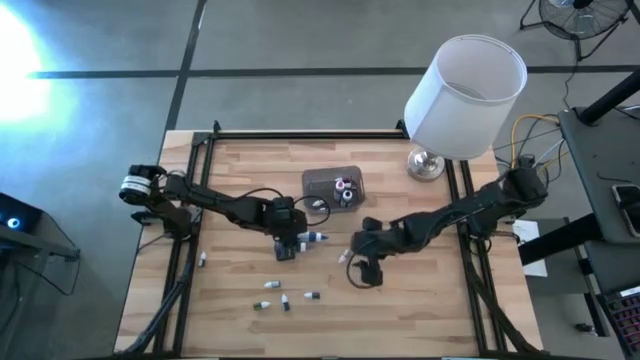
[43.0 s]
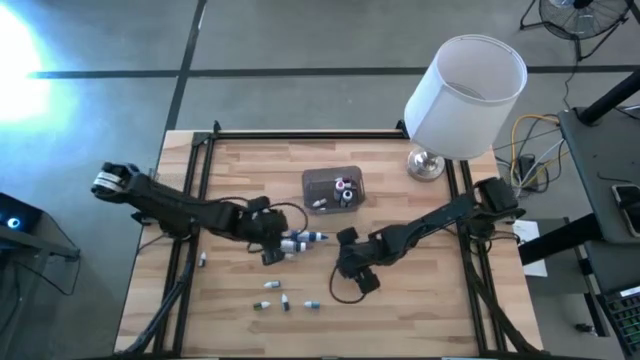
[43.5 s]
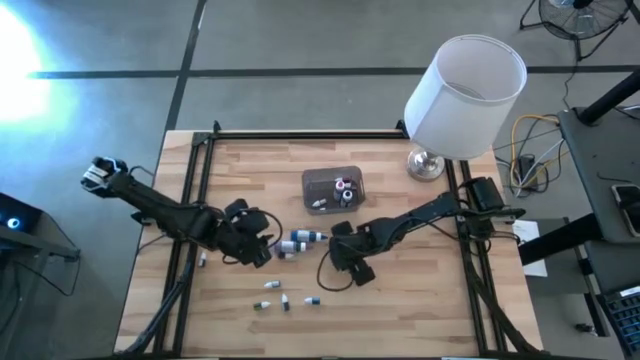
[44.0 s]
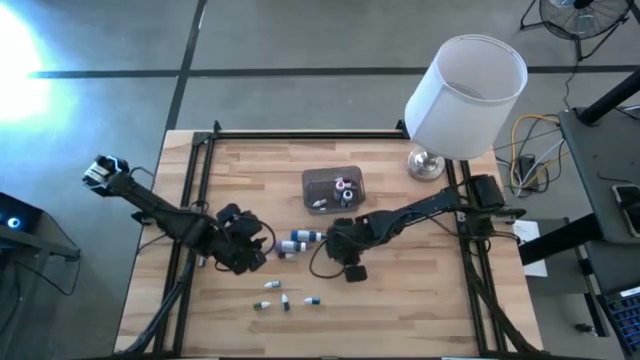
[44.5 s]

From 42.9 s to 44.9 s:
Task: Pick & Place food coloring
Put the small green food coloring bottle into the bin

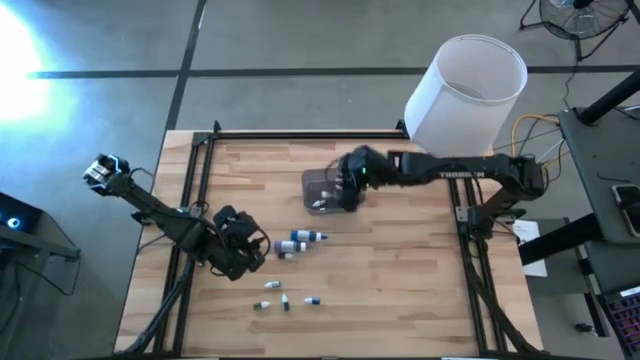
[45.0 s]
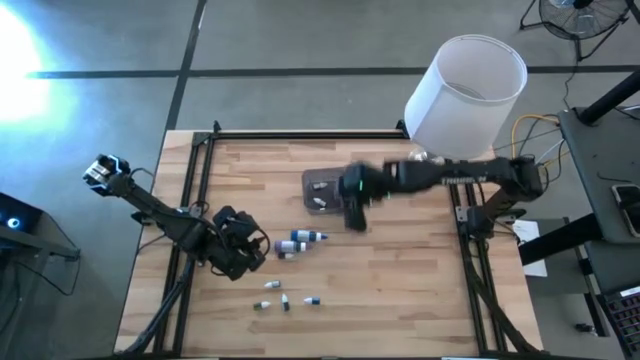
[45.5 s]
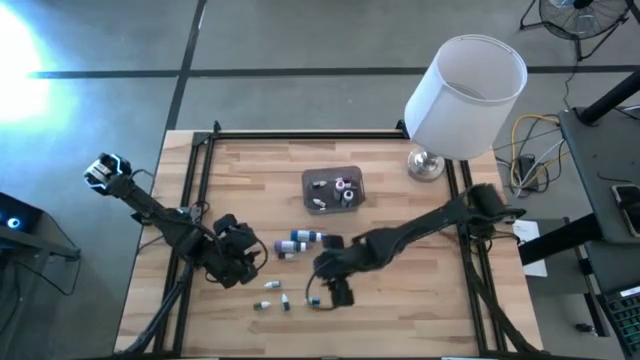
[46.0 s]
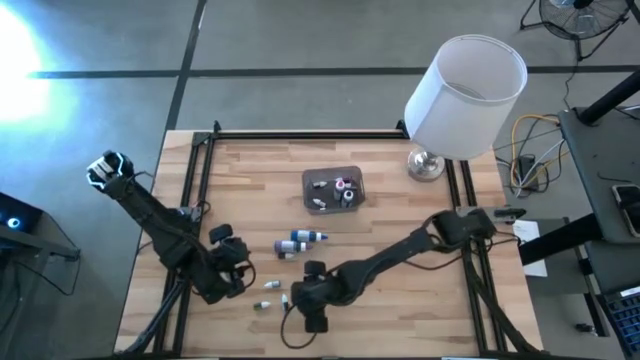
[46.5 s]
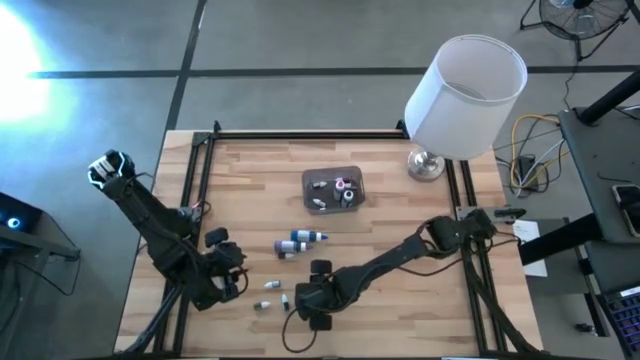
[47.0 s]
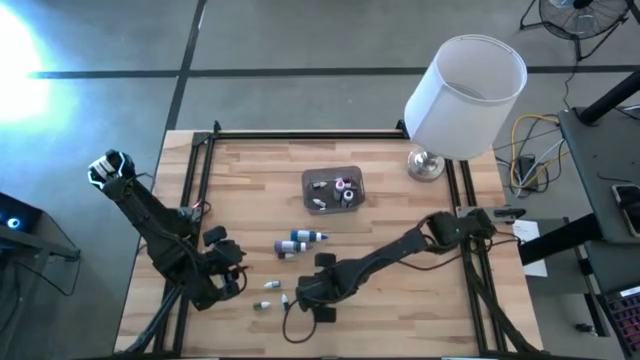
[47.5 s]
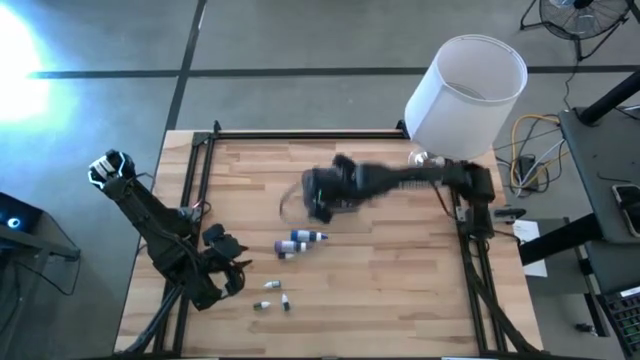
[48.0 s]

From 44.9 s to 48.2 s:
Put the small blue food coloring bottle into the bin

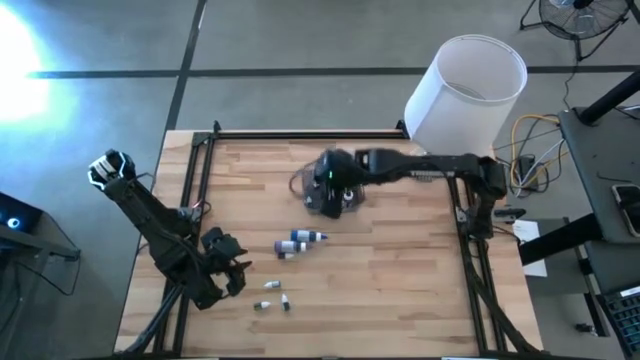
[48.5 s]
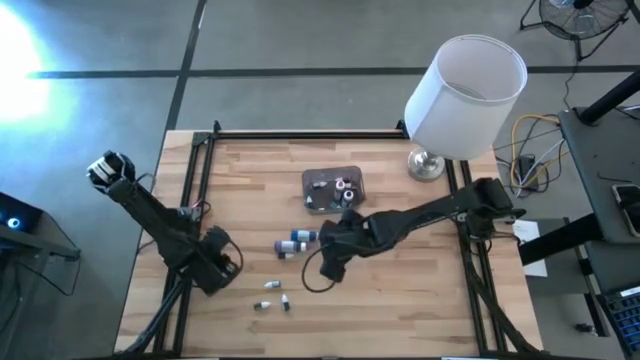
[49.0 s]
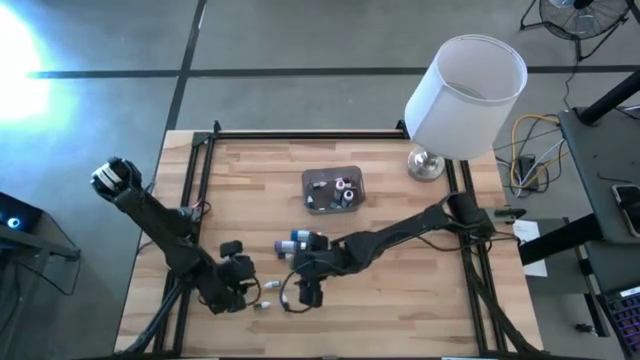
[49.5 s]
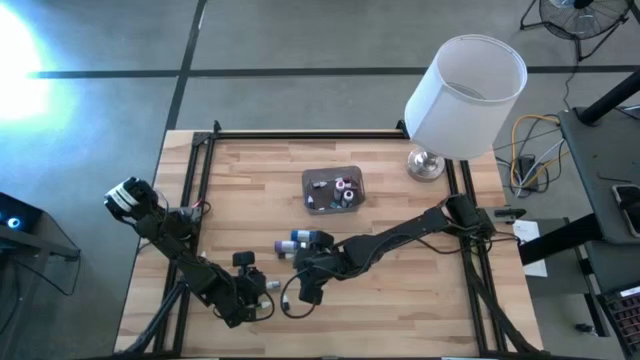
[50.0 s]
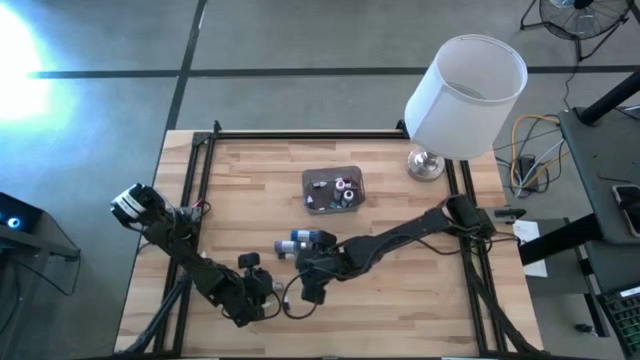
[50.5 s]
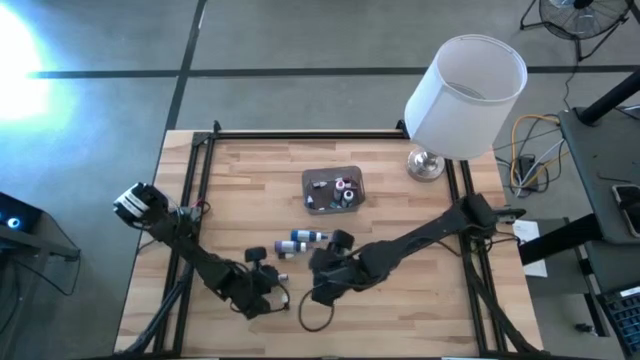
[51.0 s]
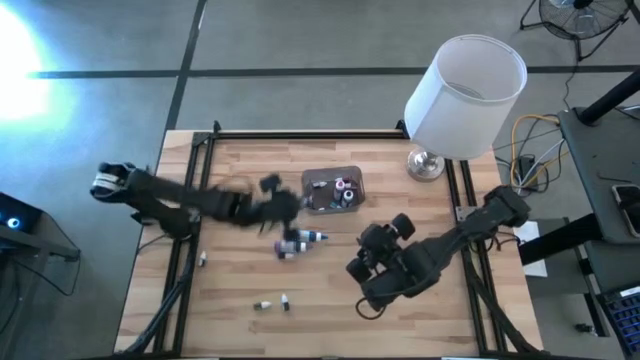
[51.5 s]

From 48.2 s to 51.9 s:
Put the small black food coloring bottle into the bin

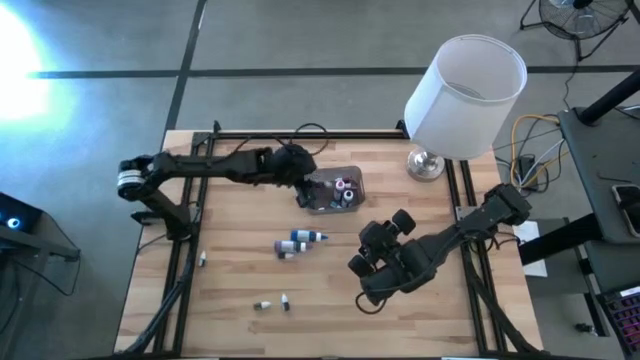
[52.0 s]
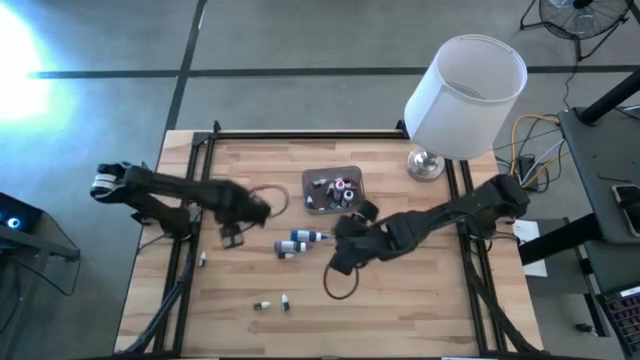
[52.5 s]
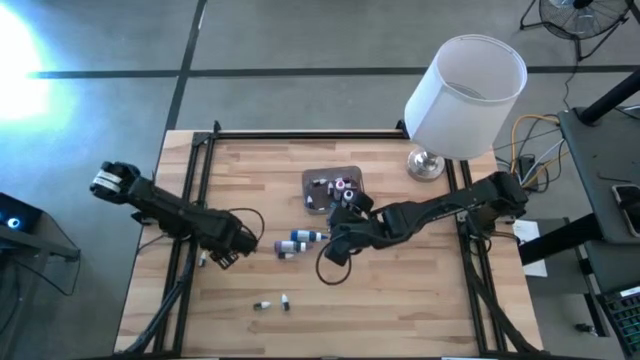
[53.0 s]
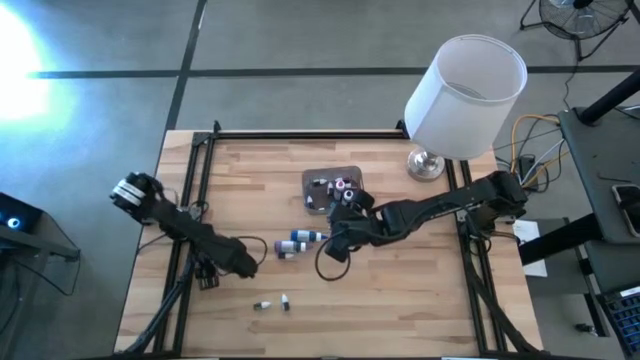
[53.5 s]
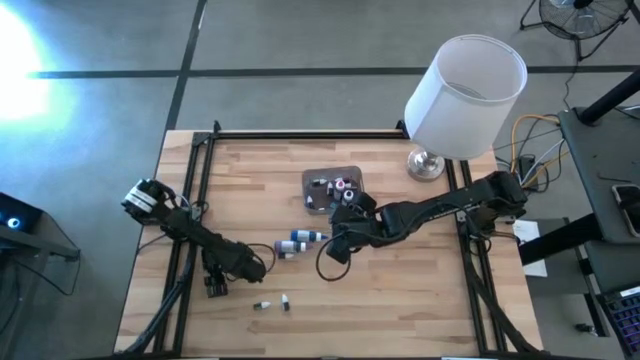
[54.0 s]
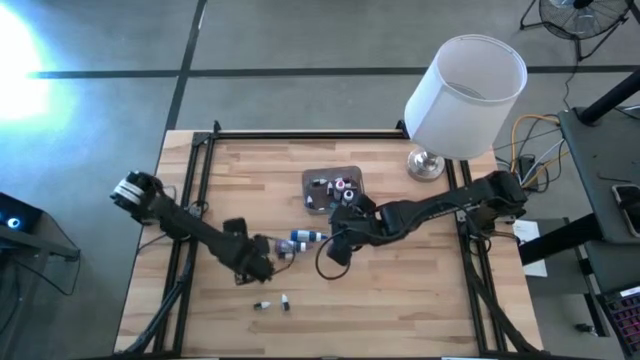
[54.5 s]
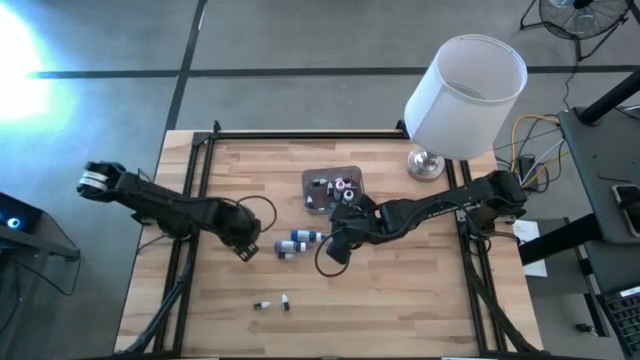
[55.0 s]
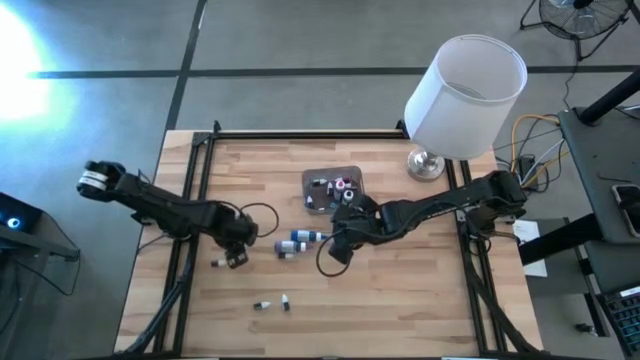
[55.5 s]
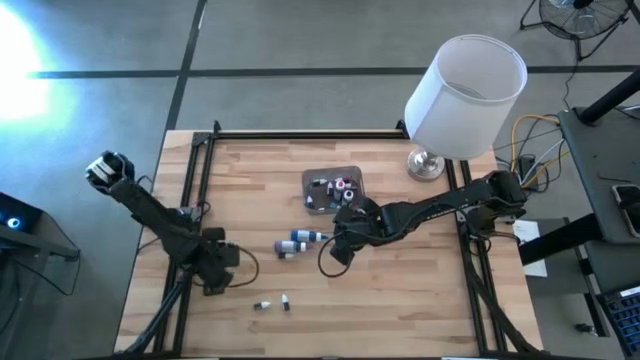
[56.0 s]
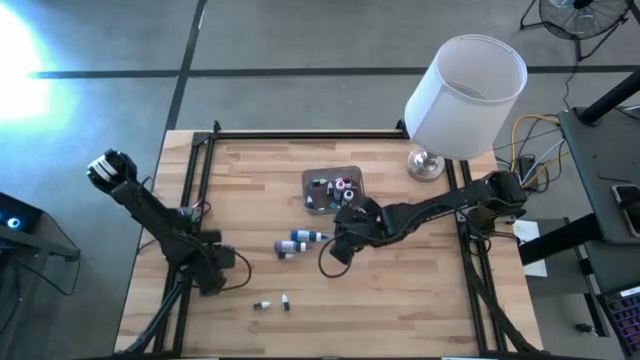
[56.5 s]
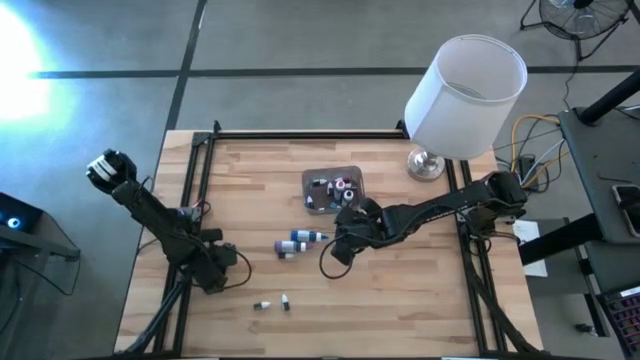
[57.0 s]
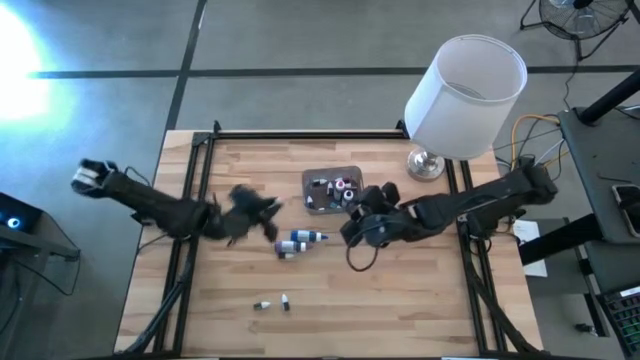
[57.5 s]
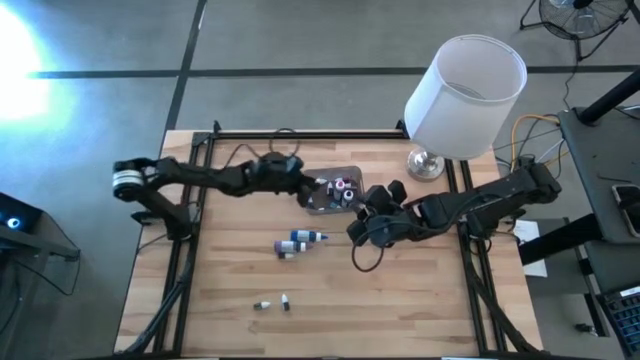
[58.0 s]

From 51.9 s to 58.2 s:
Put the small black food coloring bottle into the bin

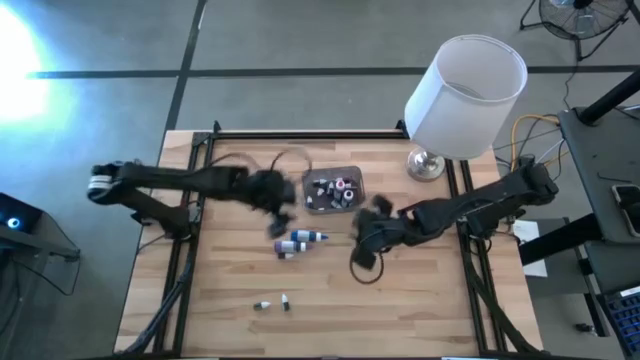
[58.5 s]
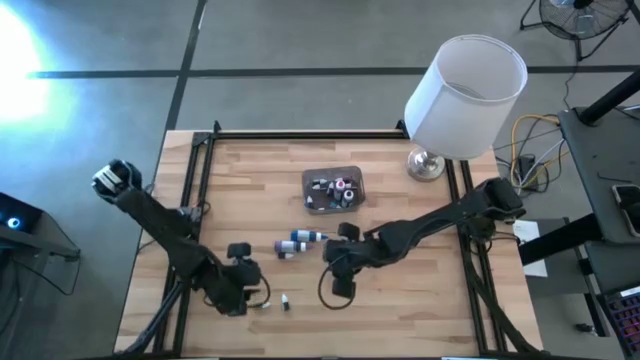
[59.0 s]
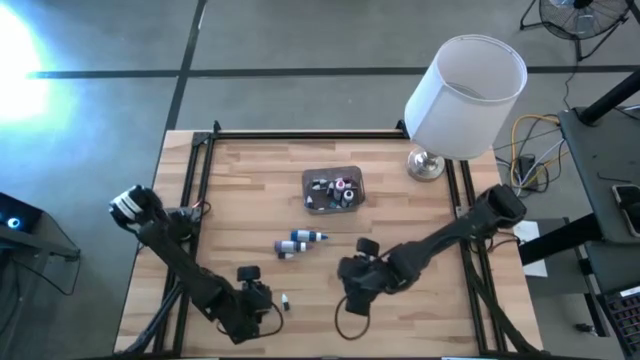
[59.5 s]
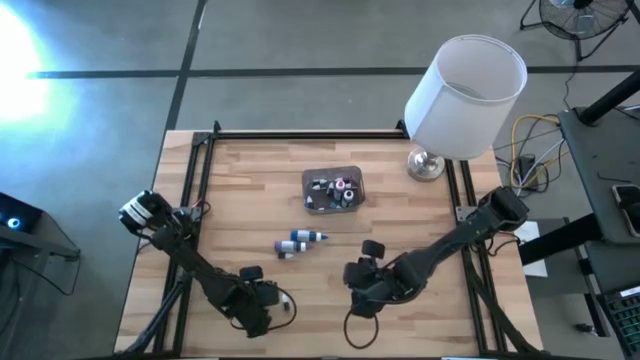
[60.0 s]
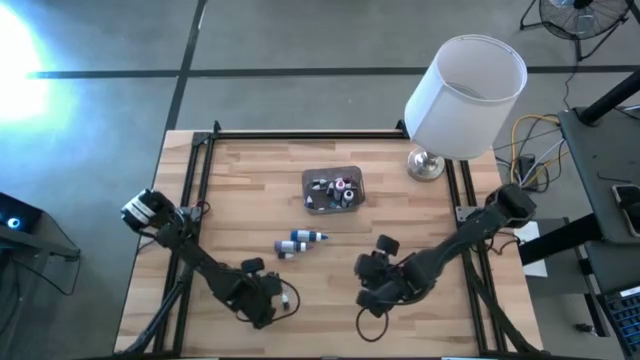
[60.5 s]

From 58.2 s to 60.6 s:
Put the small green food coloring bottle into the bin

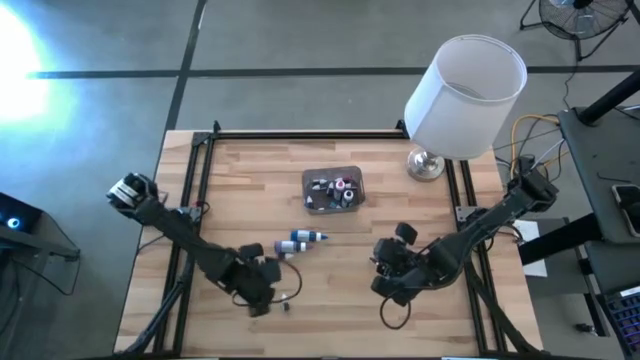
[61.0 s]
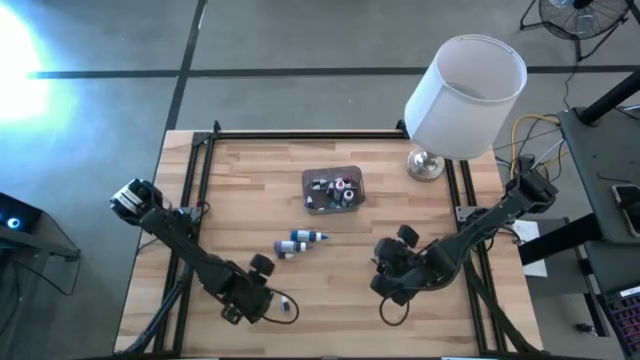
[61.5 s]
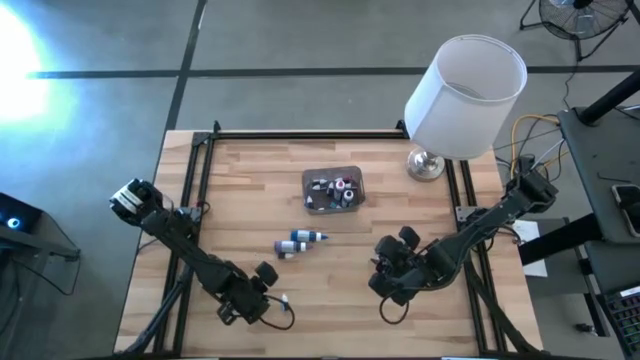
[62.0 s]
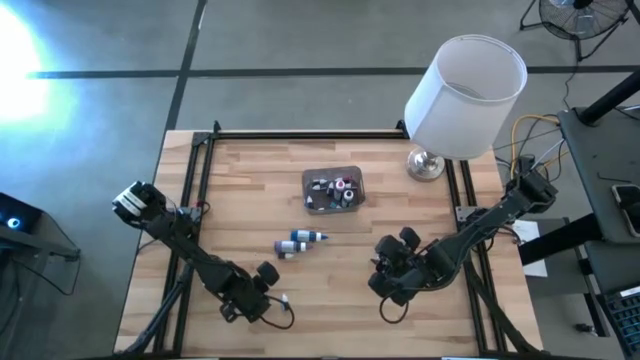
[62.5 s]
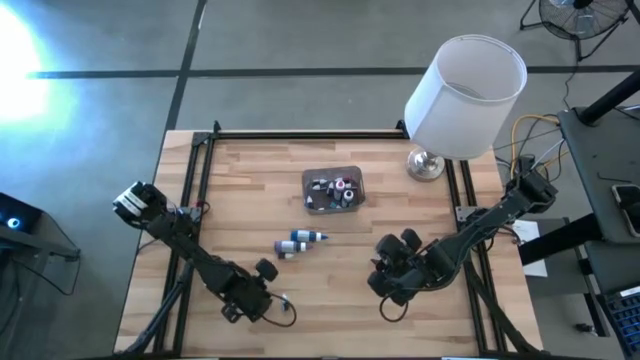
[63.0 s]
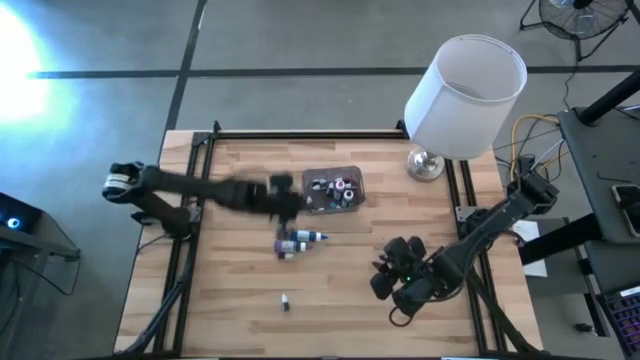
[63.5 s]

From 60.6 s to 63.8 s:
Put the small green food coloring bottle into the bin
